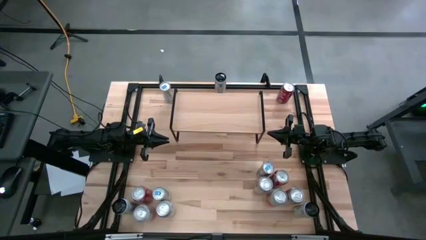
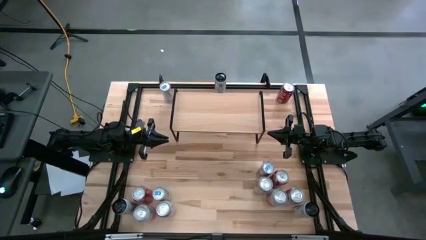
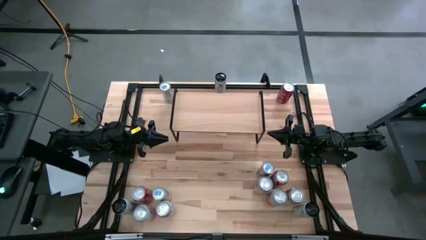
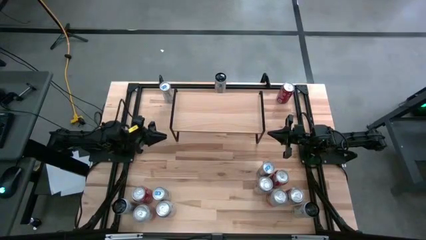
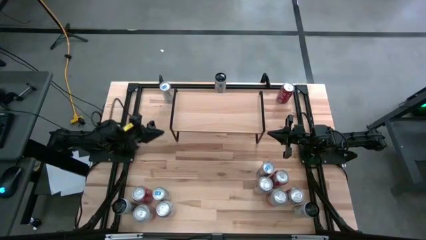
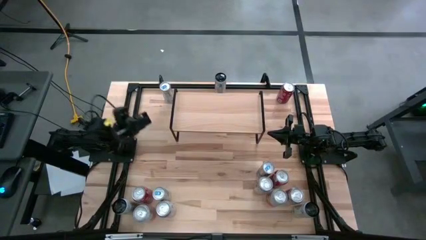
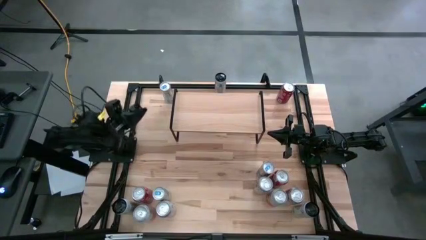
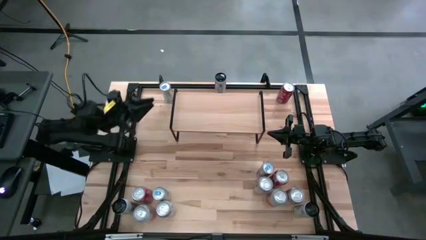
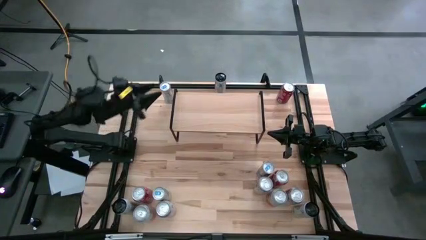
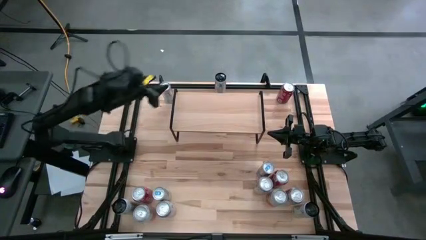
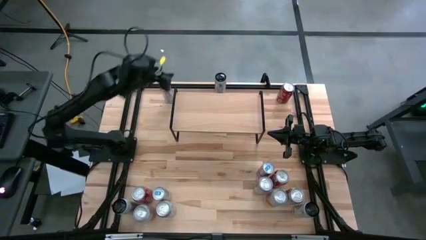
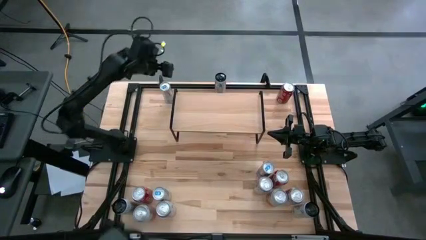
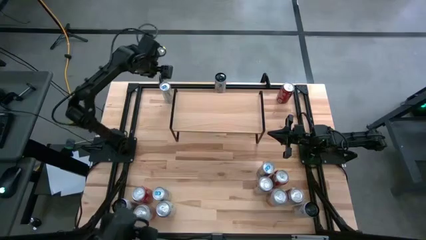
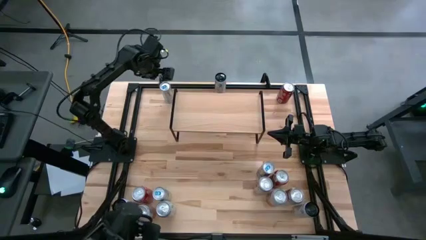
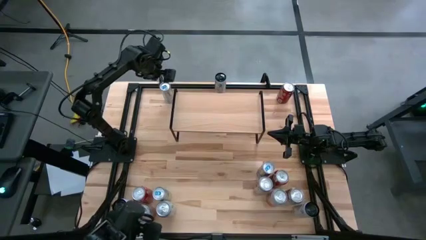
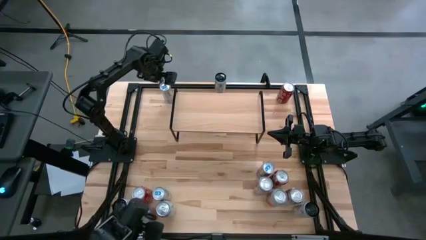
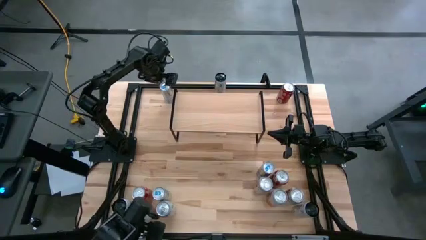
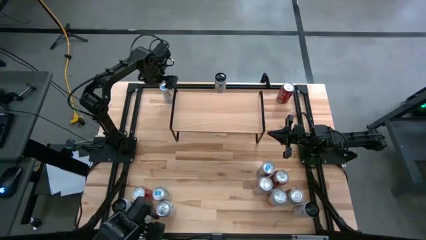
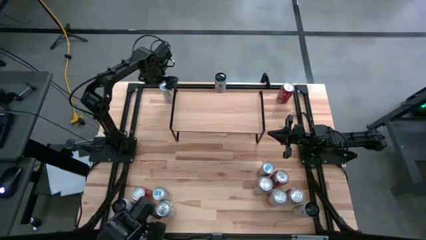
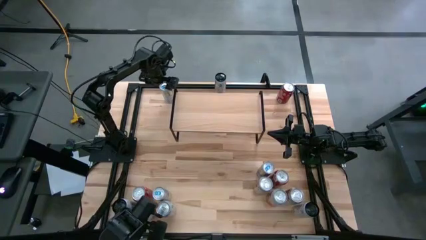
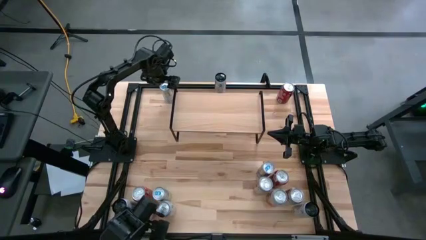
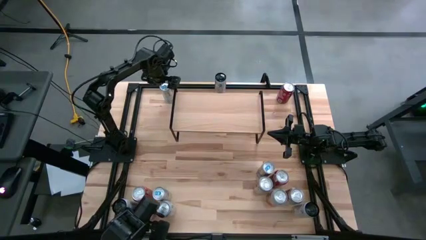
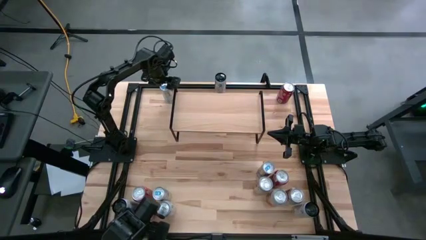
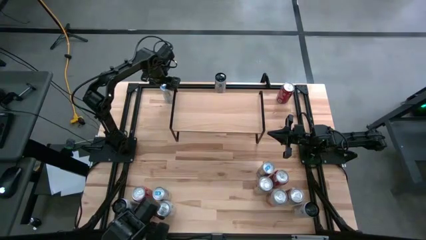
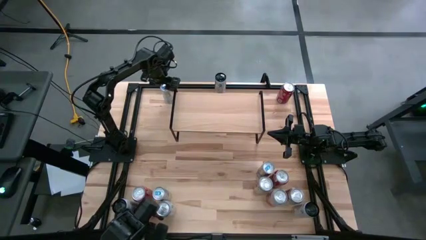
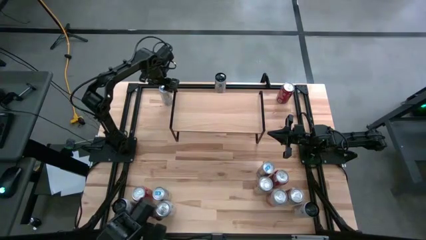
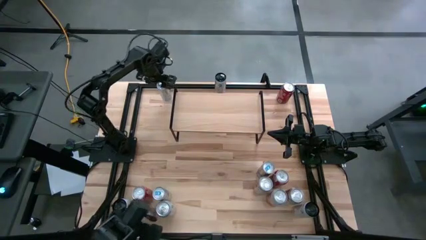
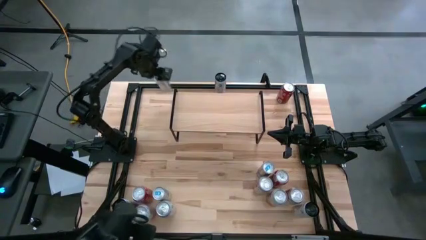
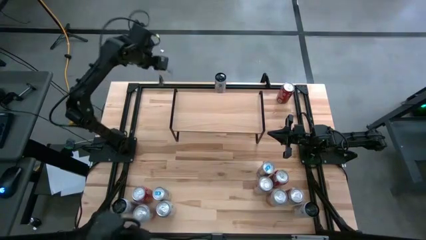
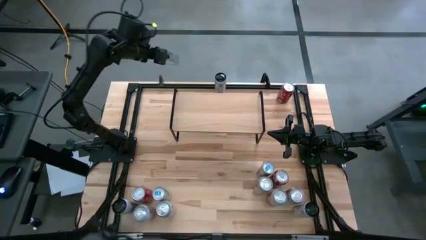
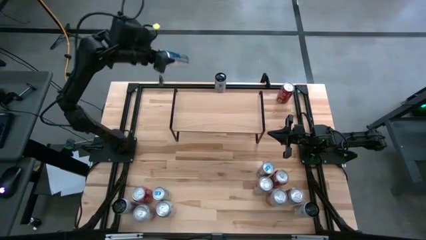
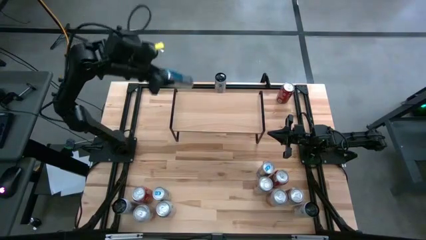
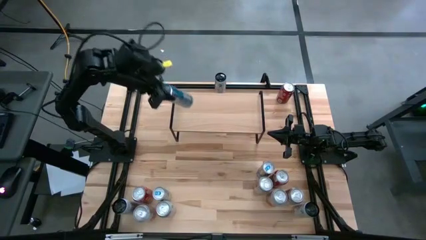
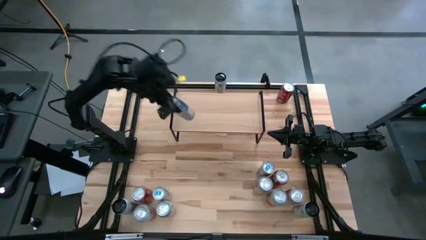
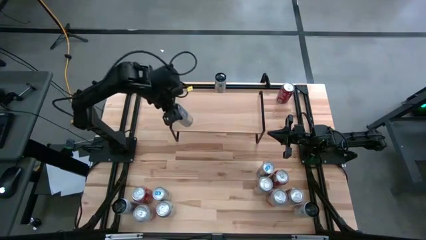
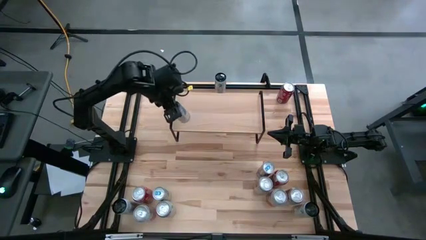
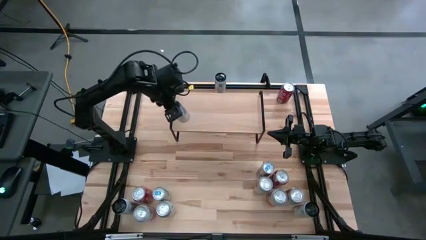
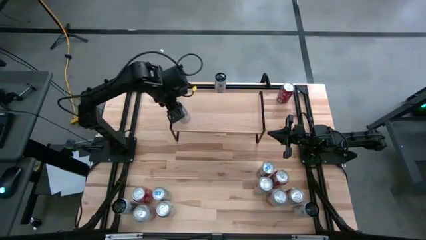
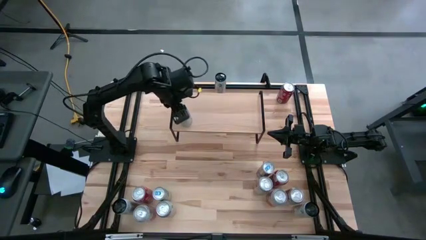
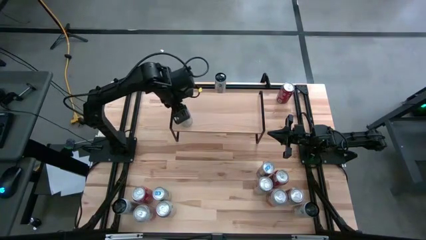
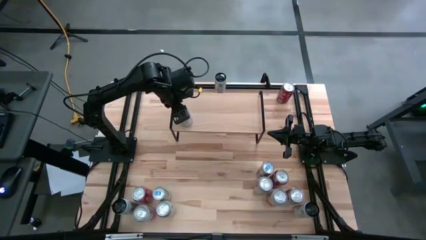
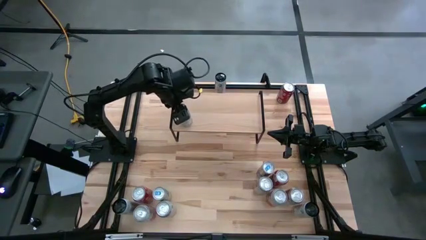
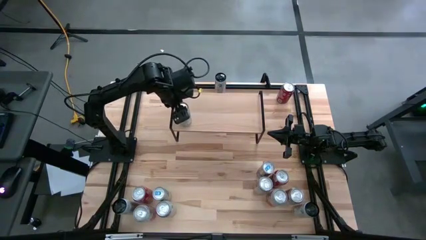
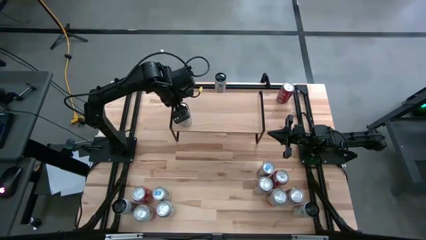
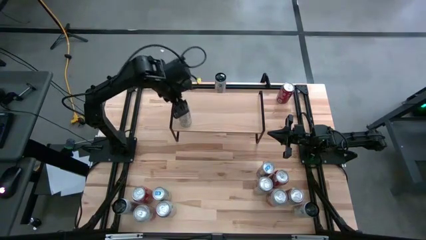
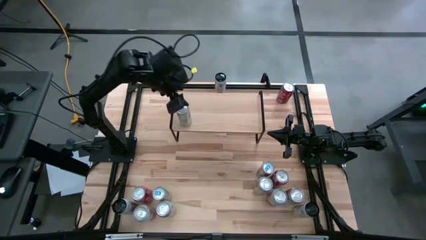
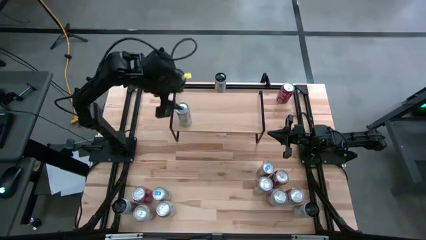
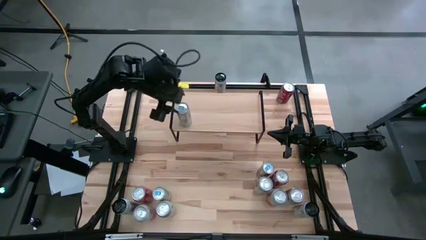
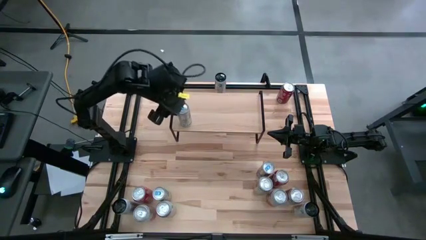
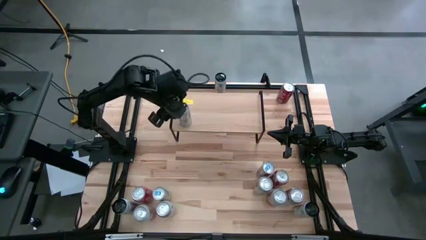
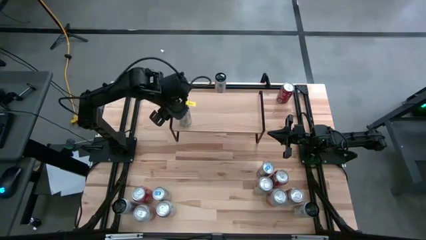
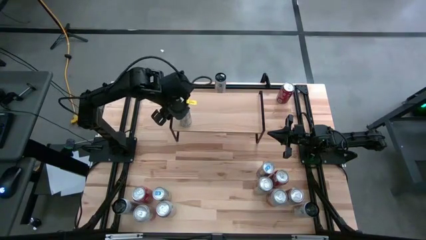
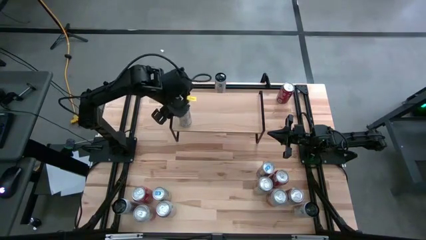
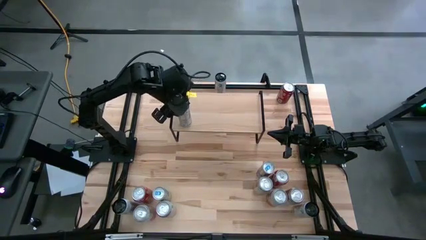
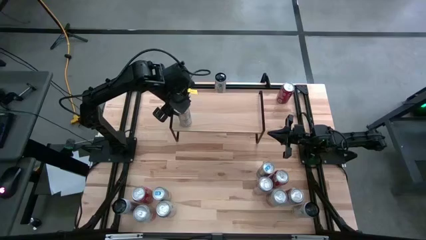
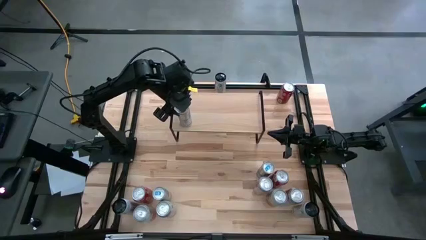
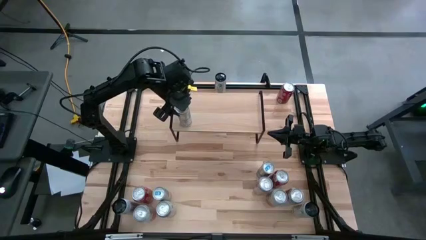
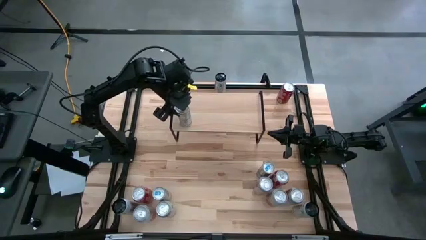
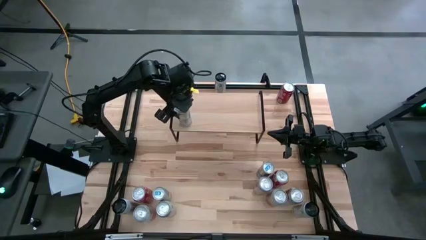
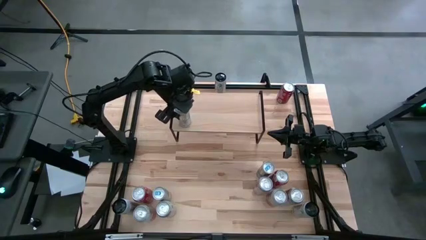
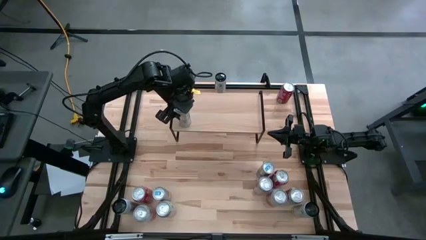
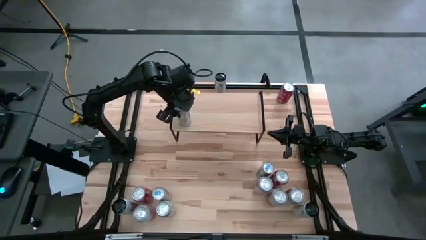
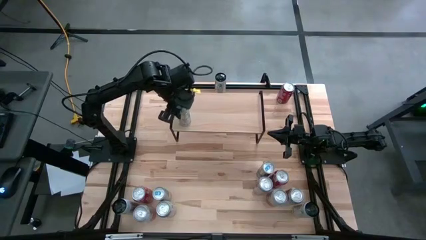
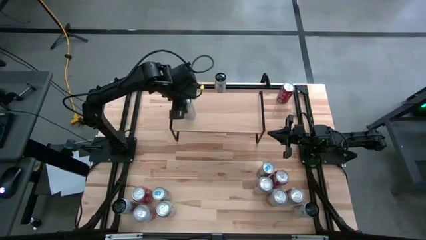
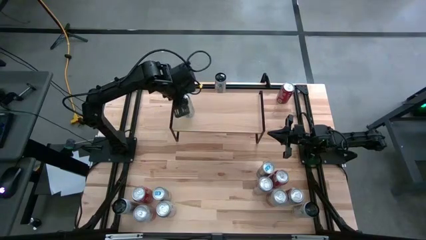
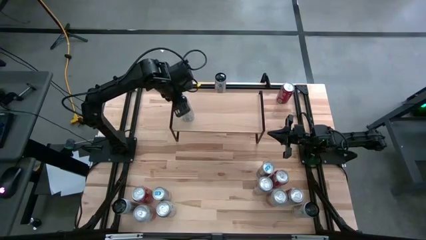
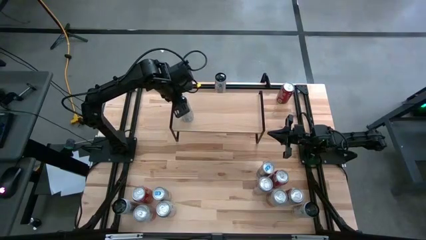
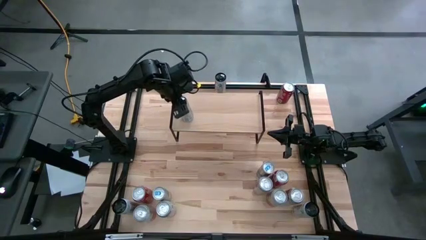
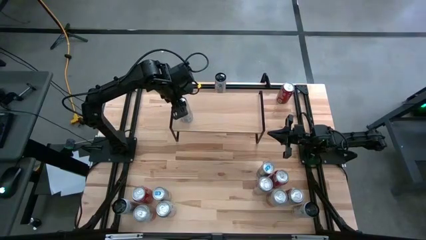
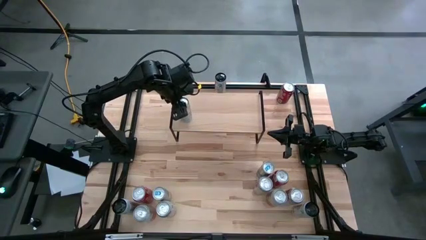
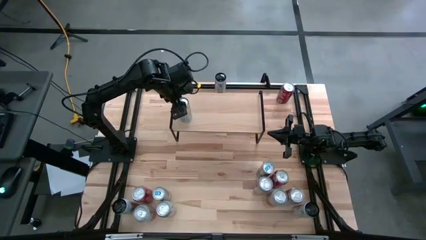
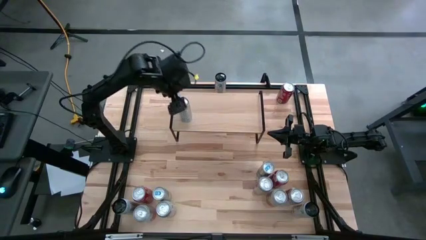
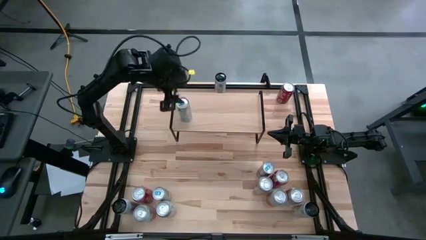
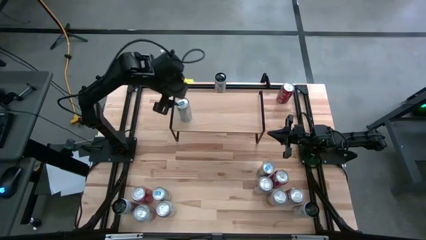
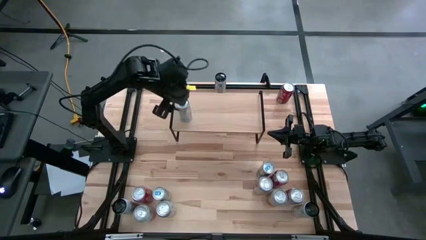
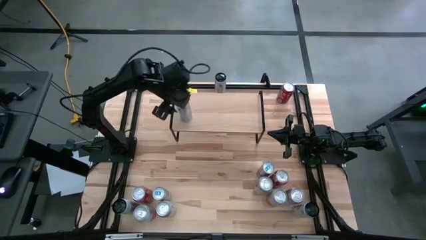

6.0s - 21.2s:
Task: Place canned beverage on shelf
Put the top blue soda can on the shelf
